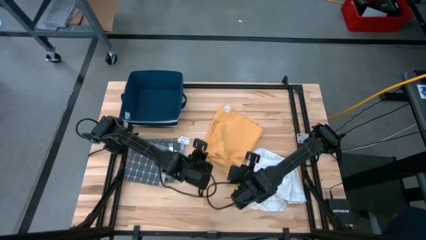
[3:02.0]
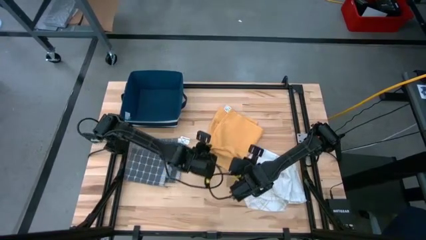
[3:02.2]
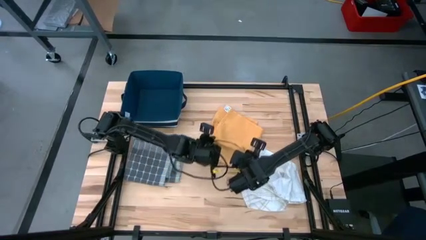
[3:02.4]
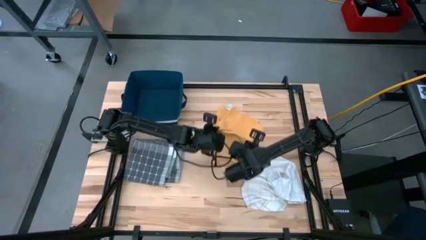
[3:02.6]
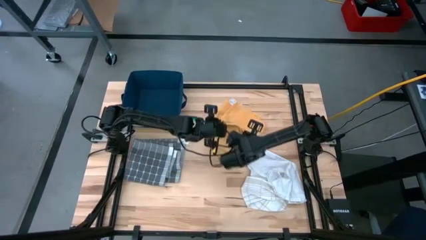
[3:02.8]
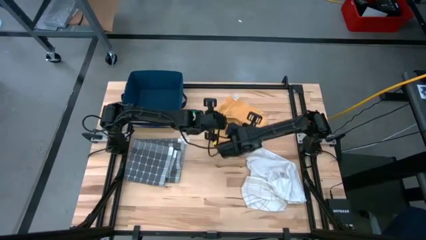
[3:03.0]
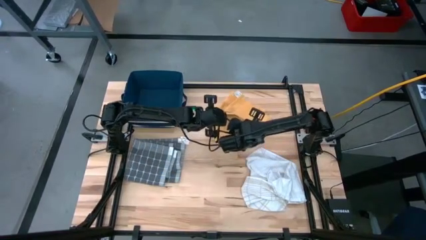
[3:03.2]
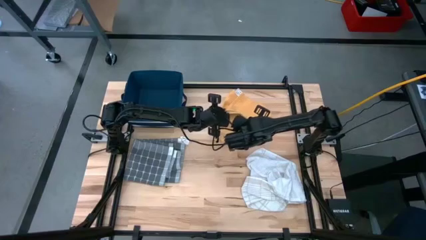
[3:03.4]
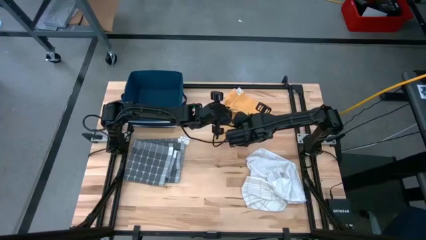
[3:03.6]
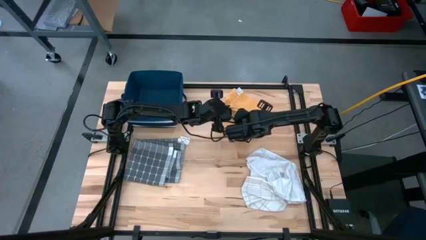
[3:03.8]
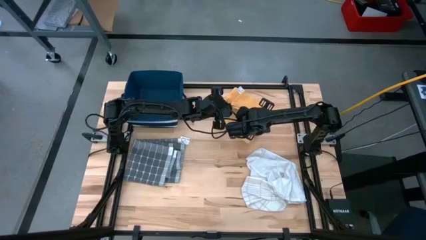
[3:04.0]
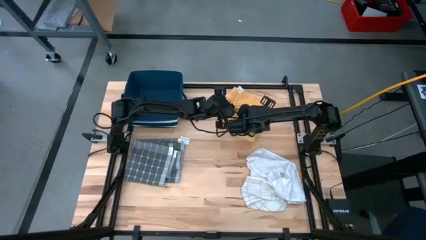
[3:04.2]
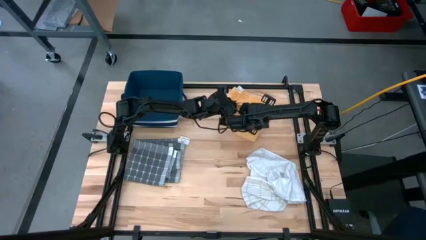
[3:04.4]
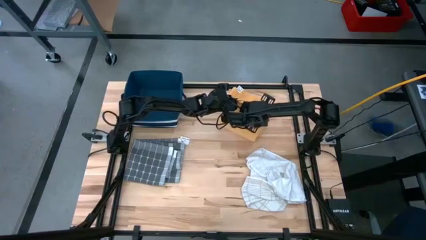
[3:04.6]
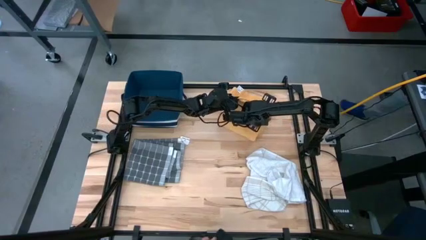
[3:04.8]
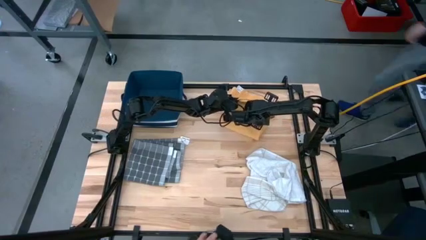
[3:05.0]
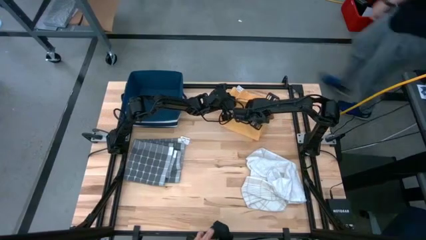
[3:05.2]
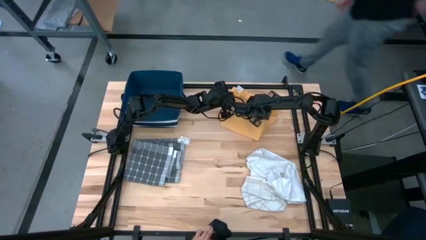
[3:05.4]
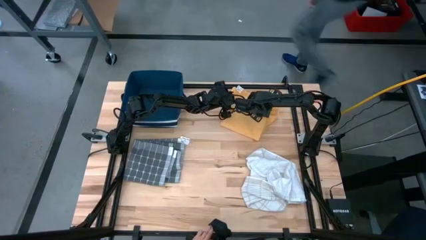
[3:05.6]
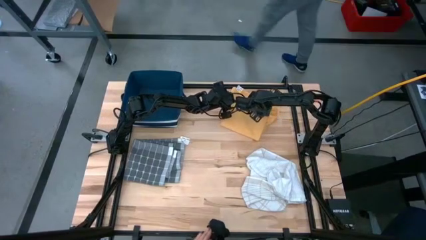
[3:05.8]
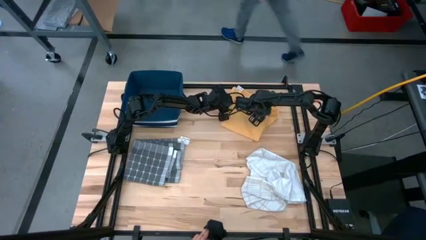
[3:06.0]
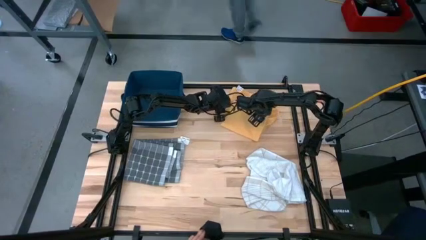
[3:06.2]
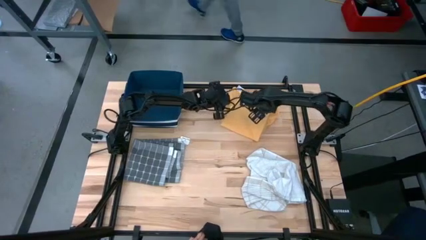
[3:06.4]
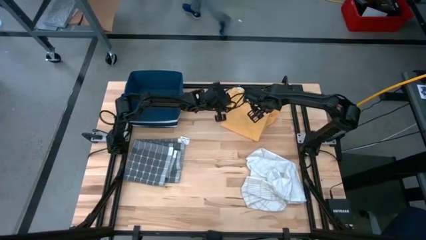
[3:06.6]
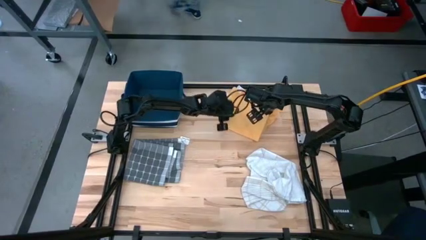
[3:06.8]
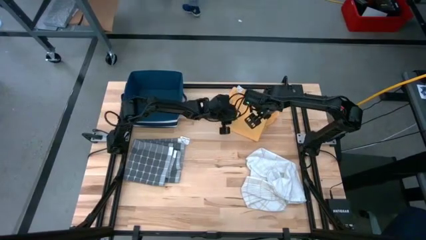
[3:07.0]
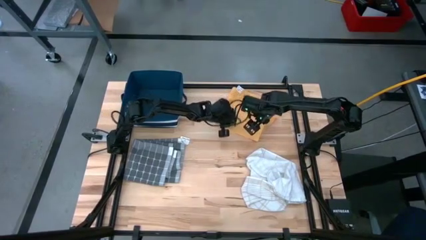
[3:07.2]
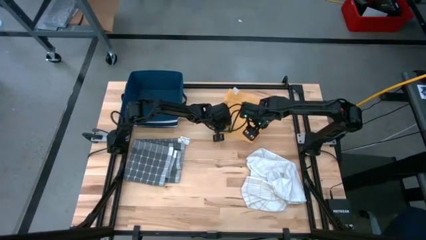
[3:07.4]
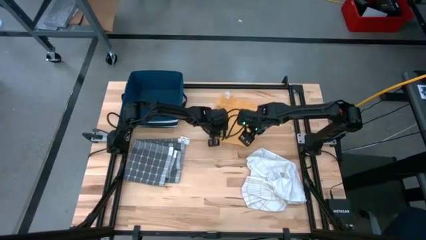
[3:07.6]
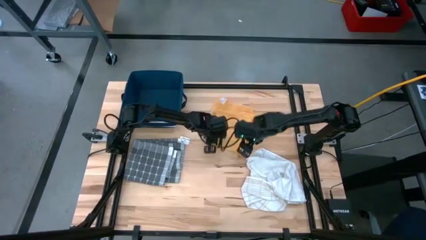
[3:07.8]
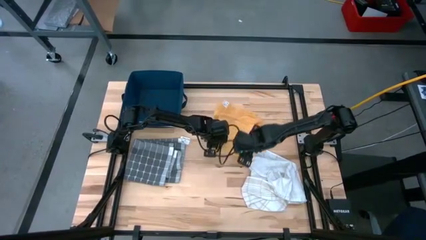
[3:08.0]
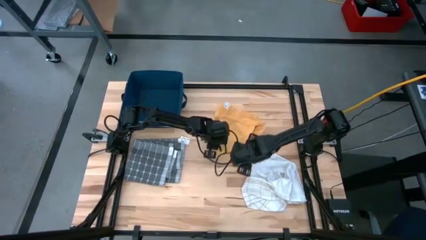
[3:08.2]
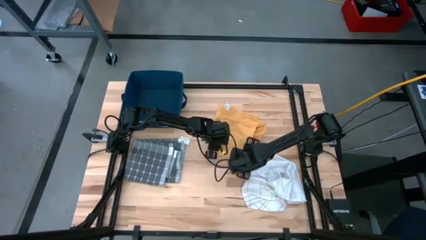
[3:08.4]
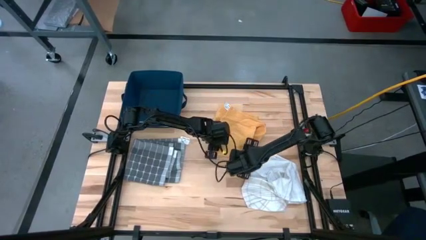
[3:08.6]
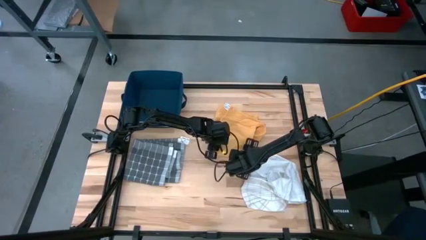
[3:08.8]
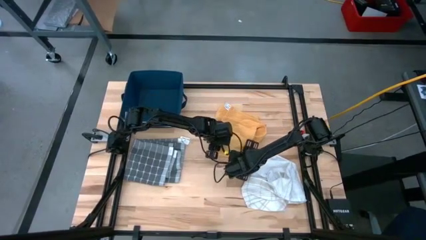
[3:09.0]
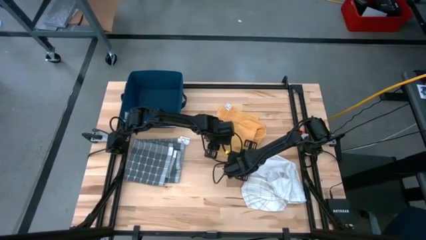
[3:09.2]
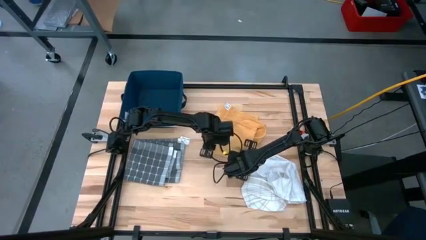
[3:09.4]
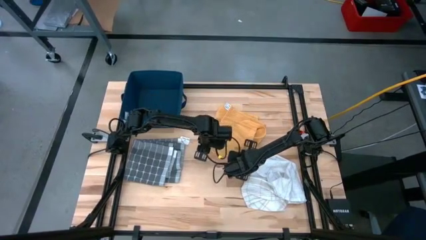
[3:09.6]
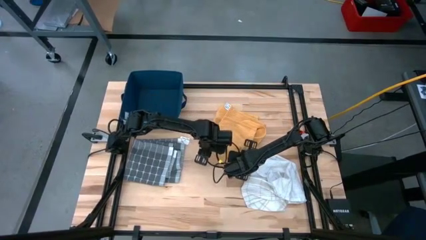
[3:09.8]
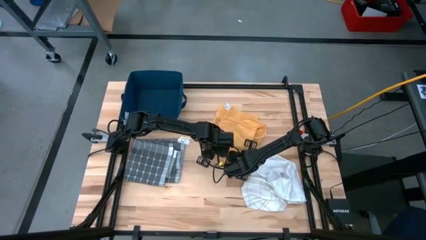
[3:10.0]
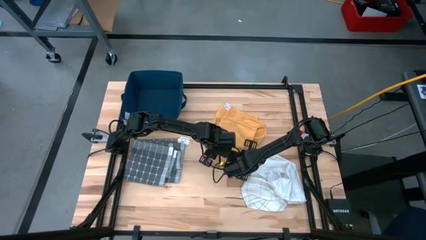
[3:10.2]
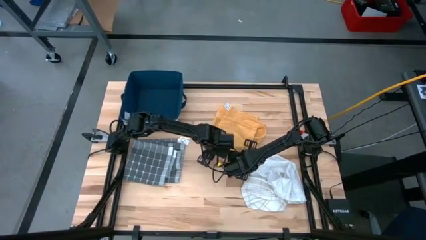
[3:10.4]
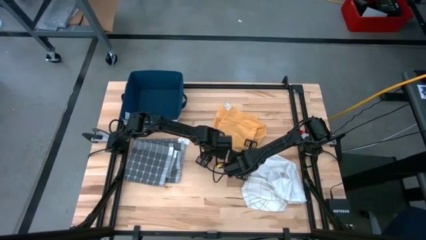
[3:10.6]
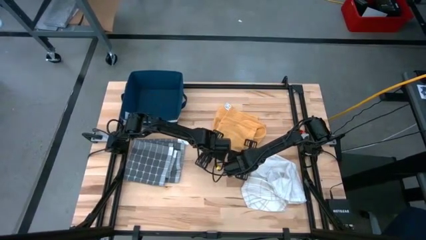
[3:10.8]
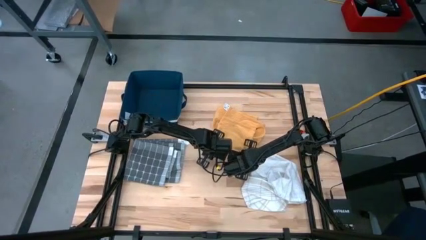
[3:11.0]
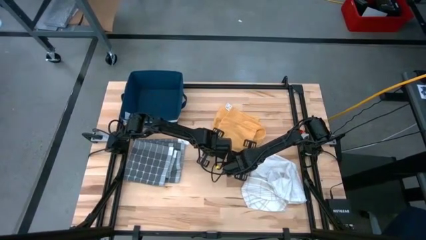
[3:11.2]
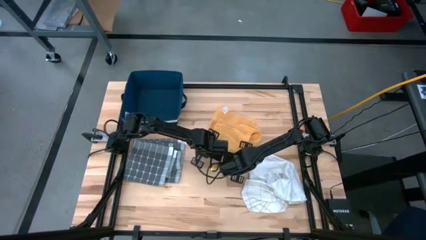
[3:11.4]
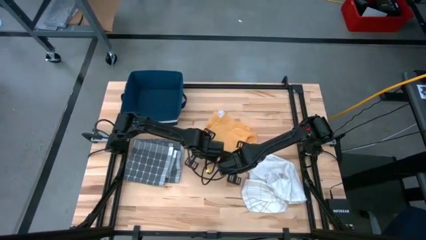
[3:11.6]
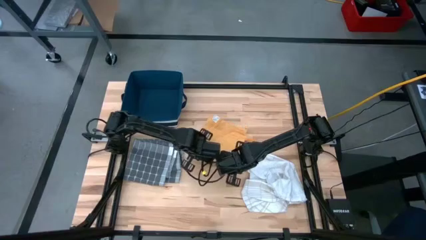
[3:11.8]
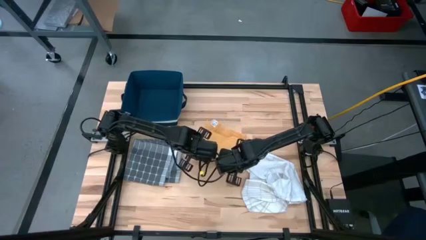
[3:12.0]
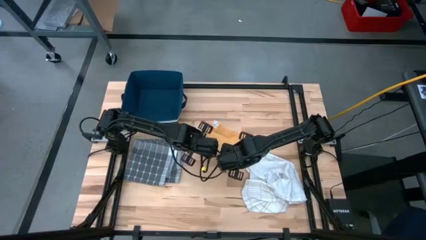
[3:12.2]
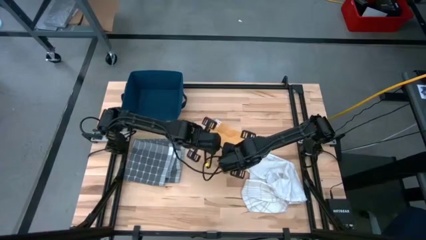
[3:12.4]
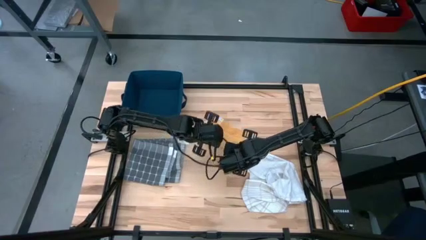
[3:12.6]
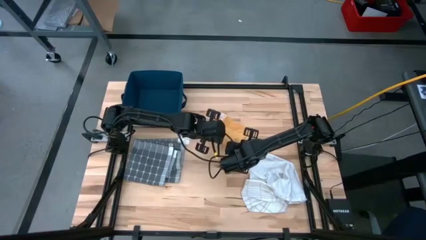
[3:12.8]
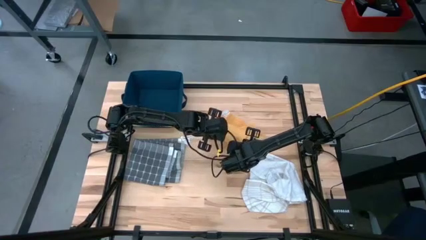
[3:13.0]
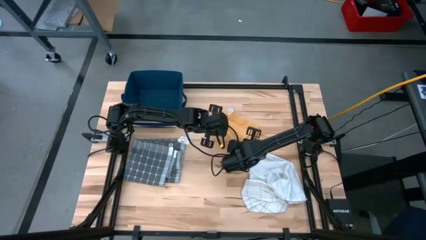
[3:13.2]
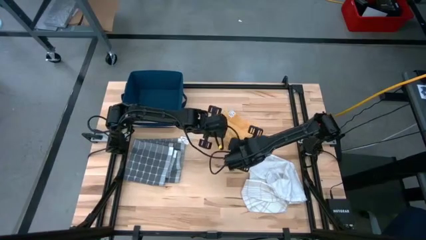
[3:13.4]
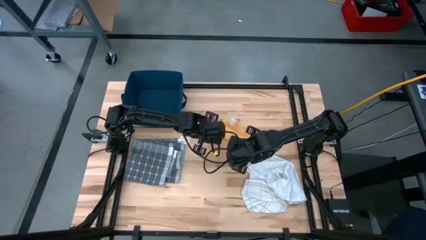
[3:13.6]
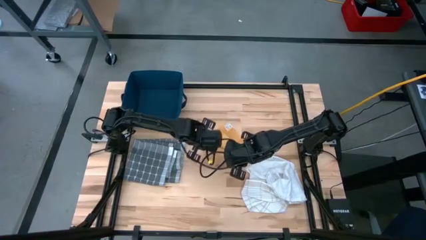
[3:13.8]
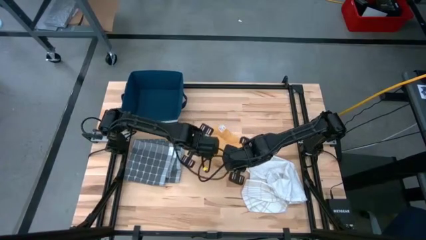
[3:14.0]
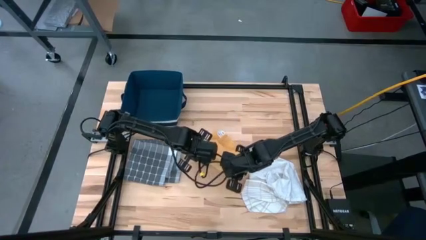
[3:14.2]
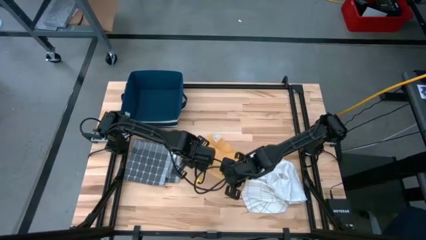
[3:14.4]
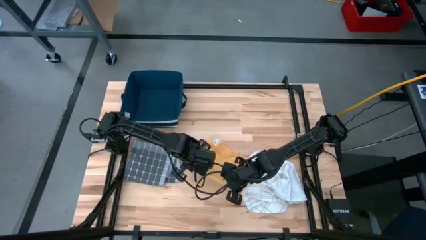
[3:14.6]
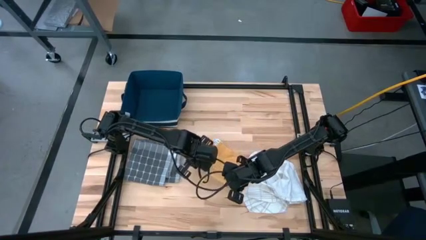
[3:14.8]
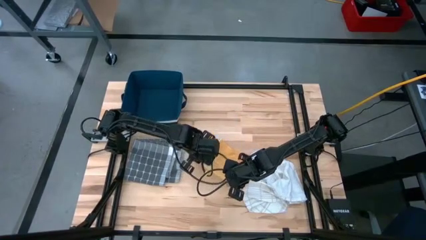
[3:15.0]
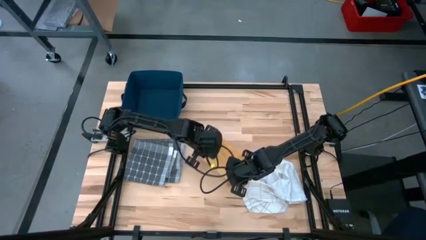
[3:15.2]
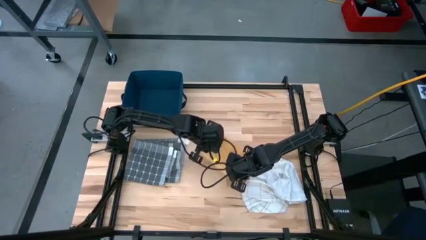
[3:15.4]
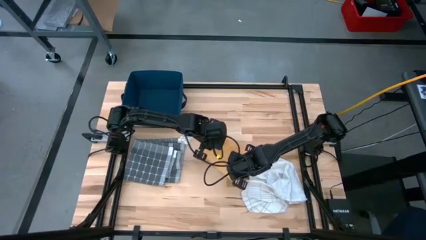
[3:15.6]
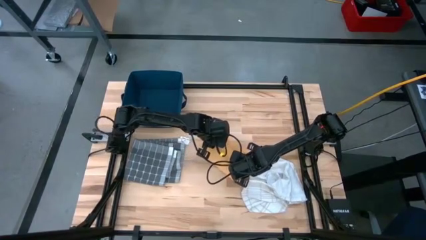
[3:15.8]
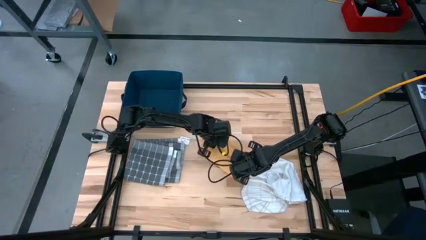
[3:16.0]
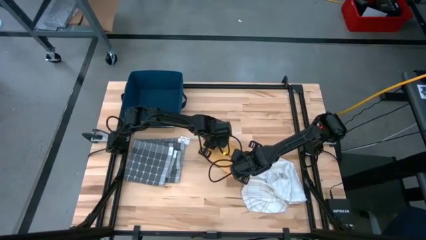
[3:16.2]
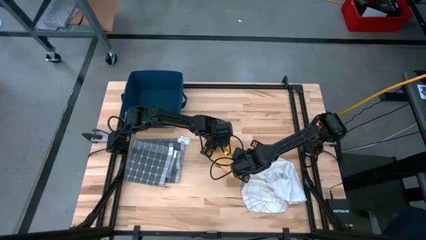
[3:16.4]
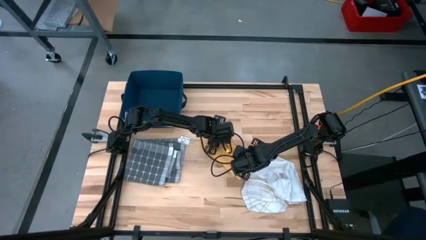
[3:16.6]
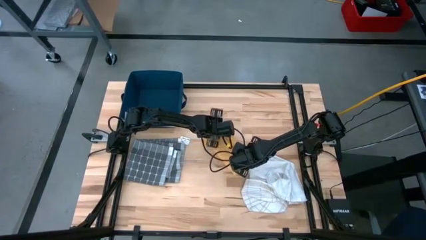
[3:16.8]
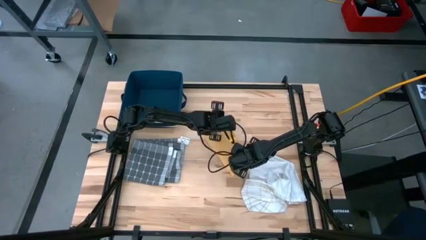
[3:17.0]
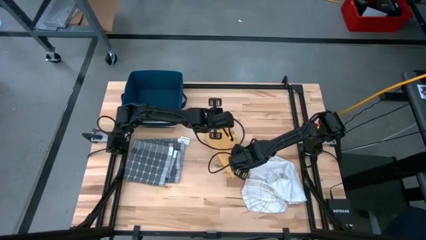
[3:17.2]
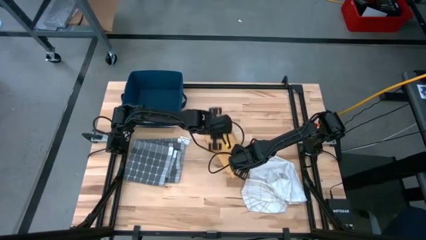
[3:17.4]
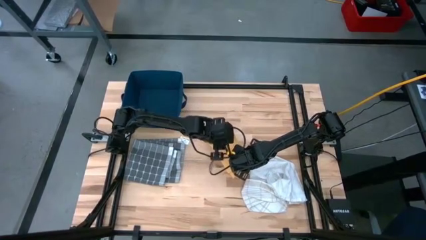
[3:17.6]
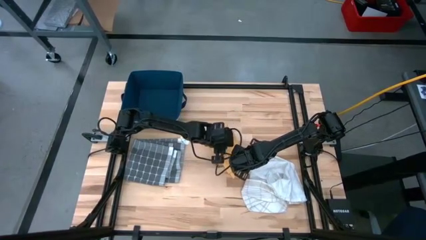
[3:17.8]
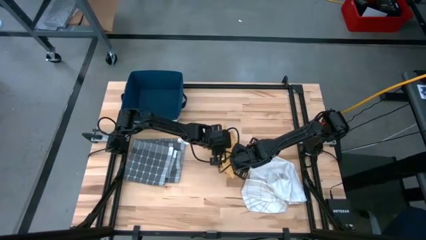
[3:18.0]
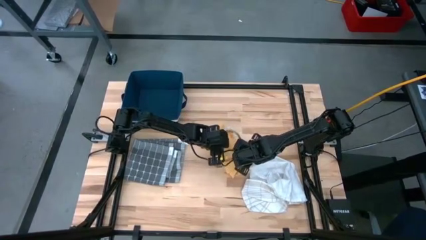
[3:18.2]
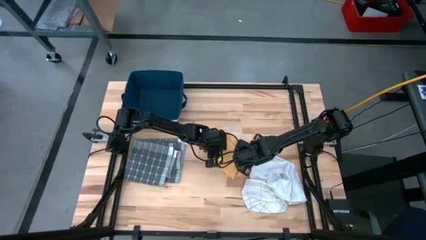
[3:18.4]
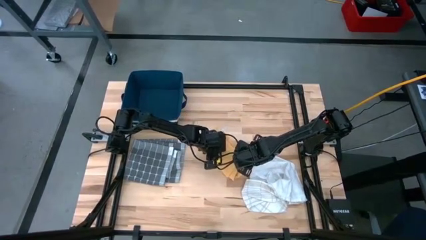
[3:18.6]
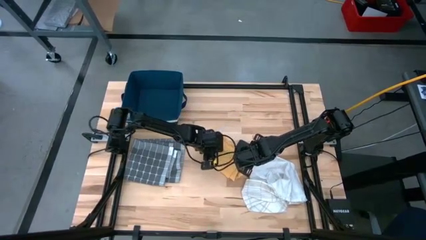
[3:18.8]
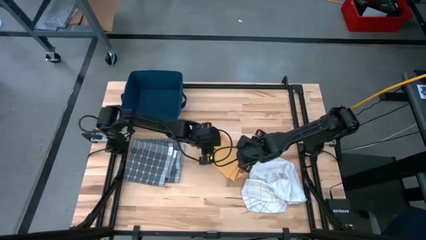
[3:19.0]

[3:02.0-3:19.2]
Task: Fold towel
Fold the yellow towel
